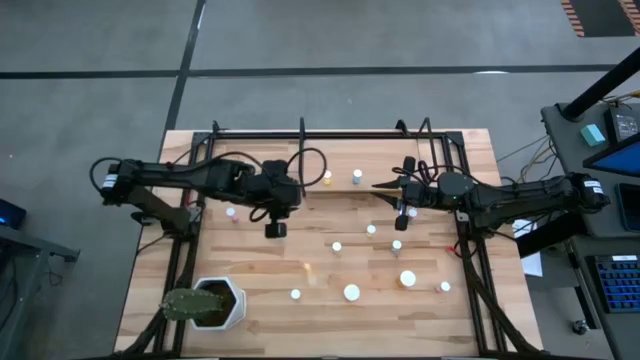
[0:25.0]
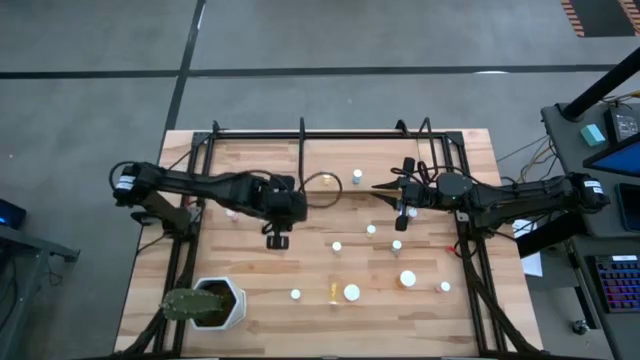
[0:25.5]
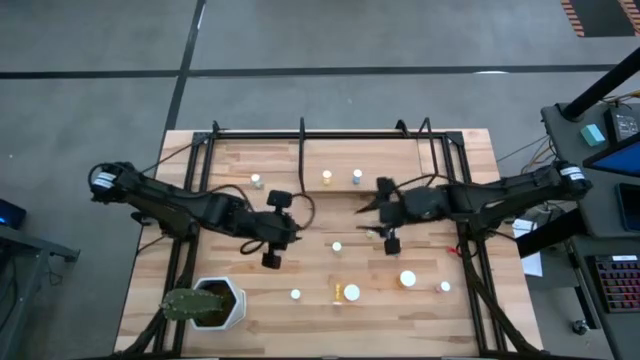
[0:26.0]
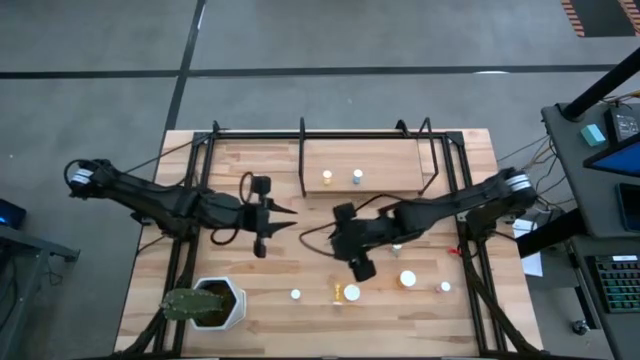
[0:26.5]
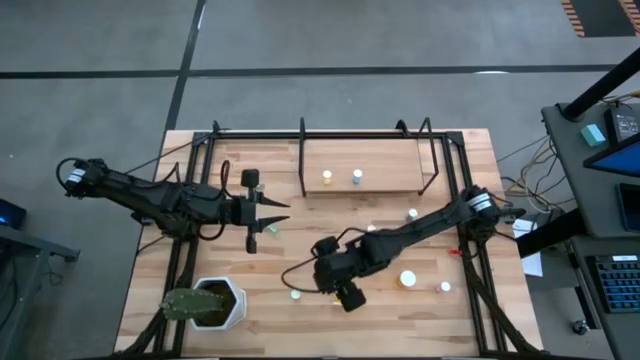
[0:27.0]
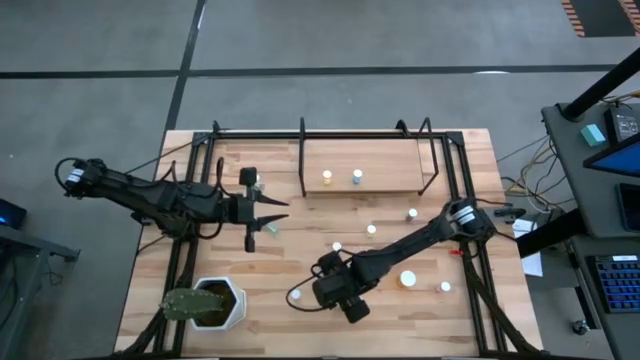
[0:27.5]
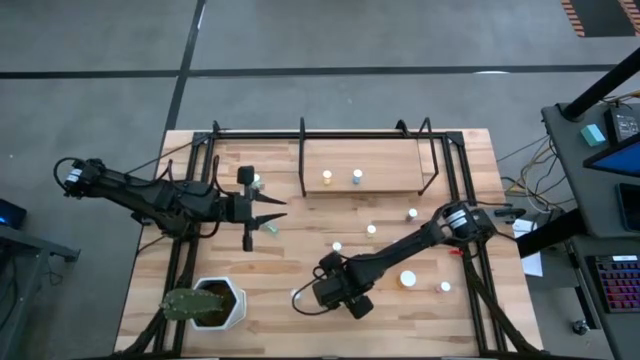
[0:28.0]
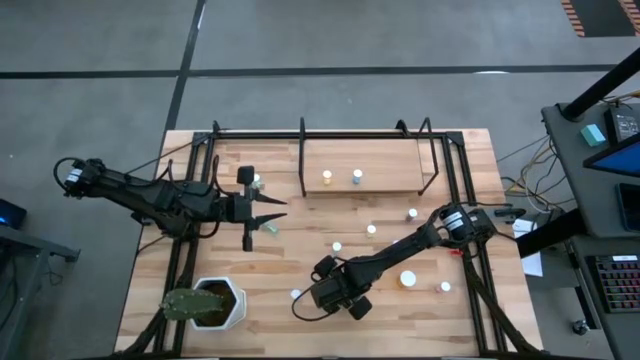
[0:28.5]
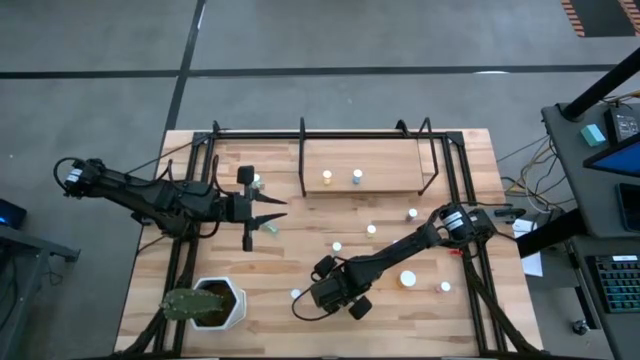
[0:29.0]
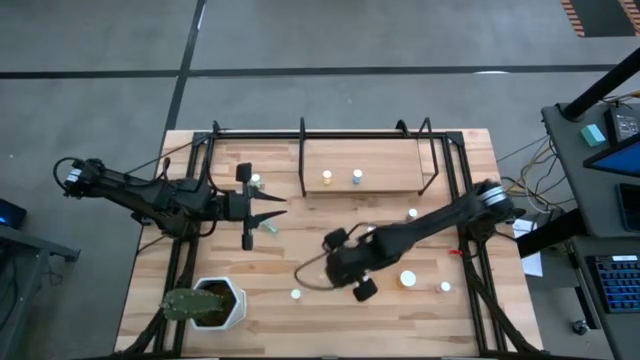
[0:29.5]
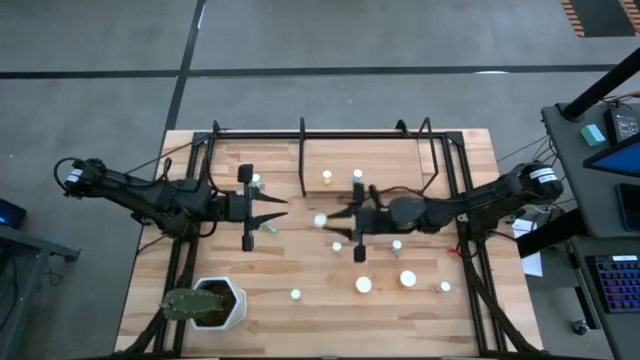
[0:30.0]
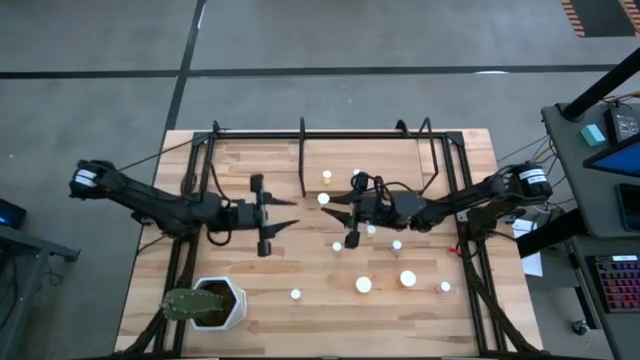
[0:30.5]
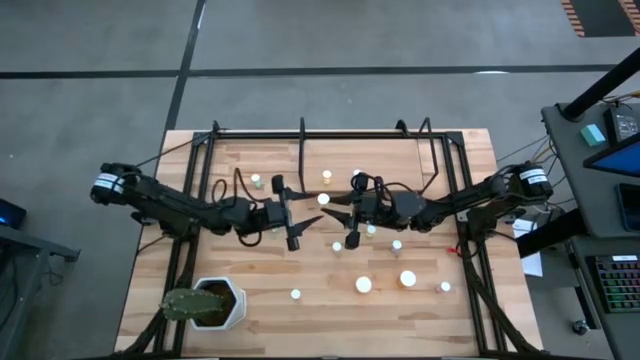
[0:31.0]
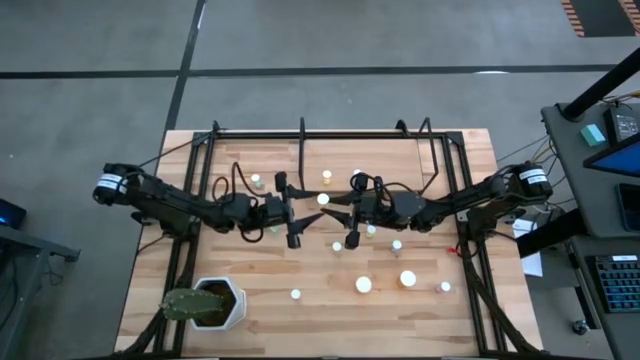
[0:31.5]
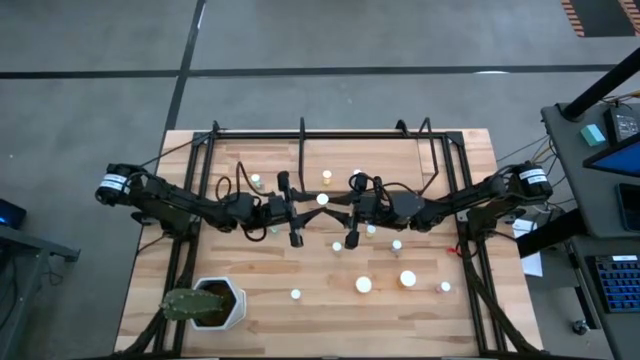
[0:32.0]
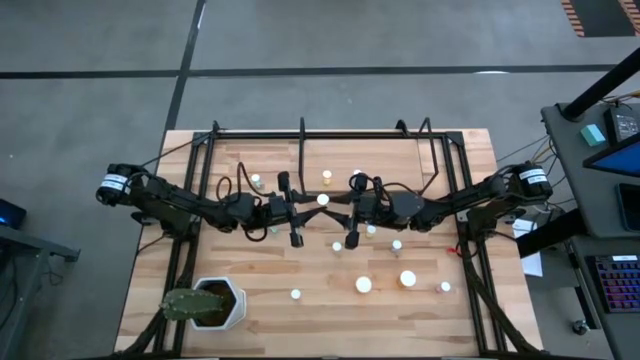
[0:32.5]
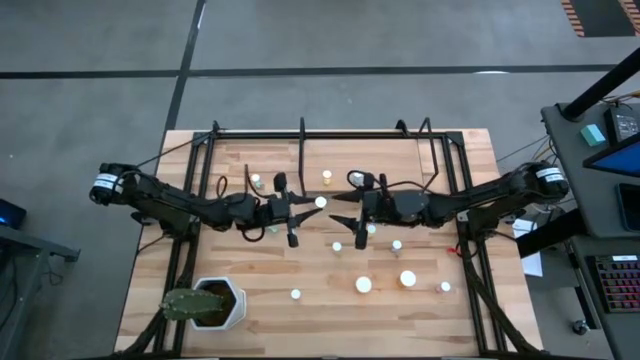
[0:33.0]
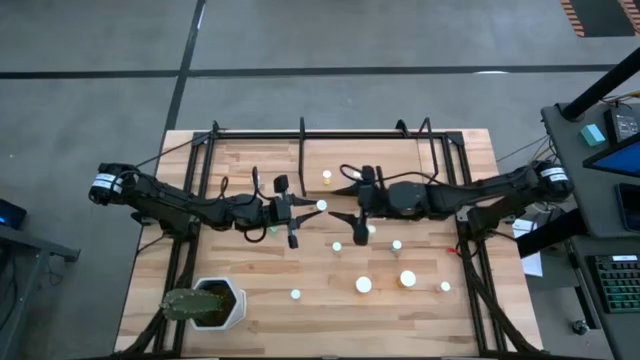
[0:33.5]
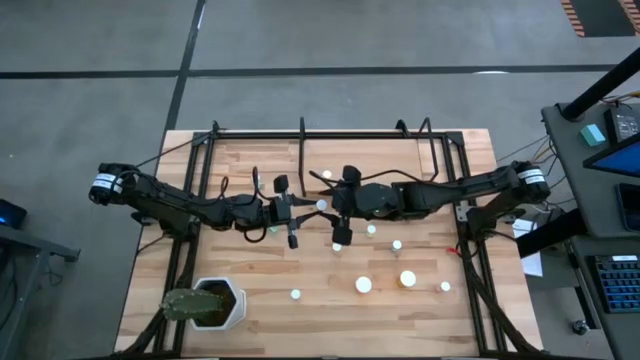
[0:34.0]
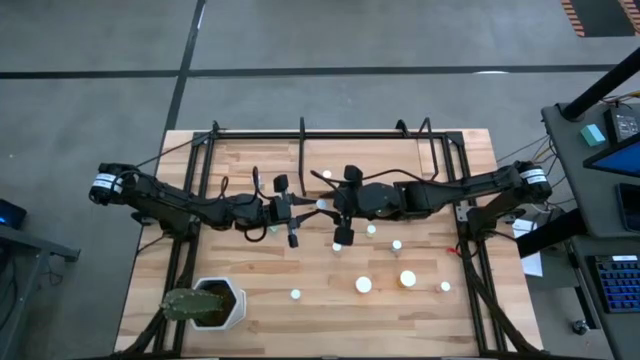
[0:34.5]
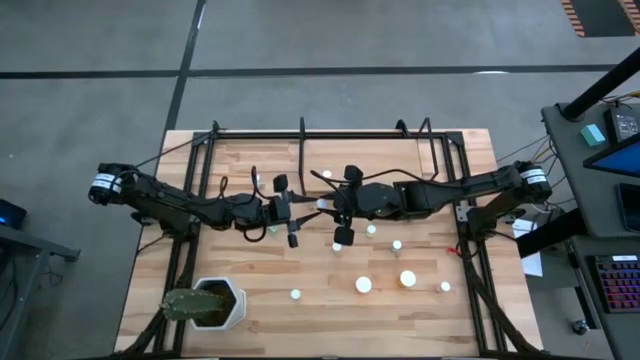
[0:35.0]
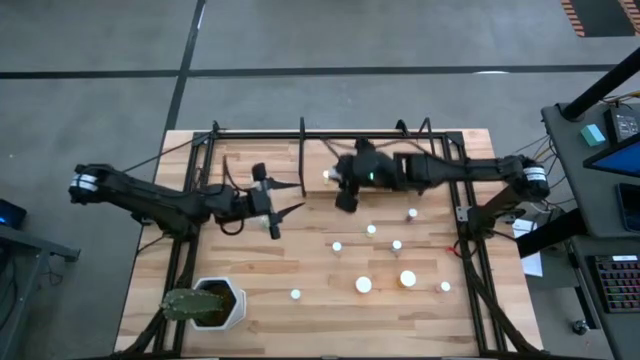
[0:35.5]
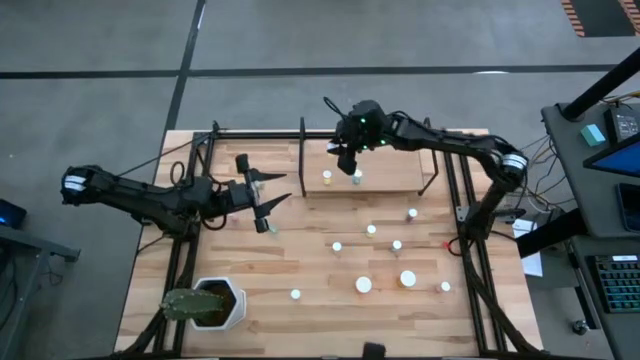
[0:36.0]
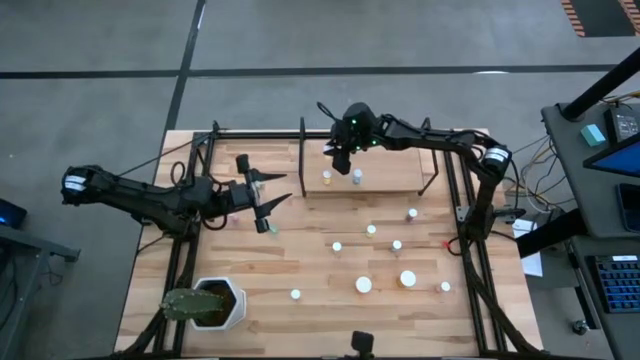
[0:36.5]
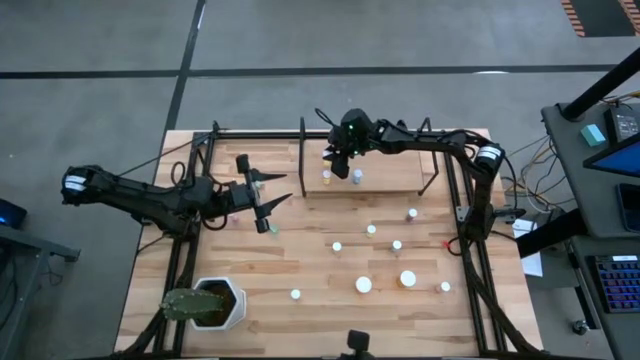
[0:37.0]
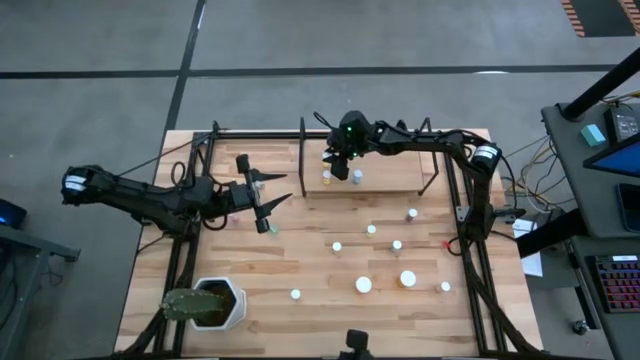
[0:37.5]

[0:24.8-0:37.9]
Task: Pick and place medicine bottles onto shelf by color
Put the yellow pill bottle on the shelf aligned with the other yellow pill bottle

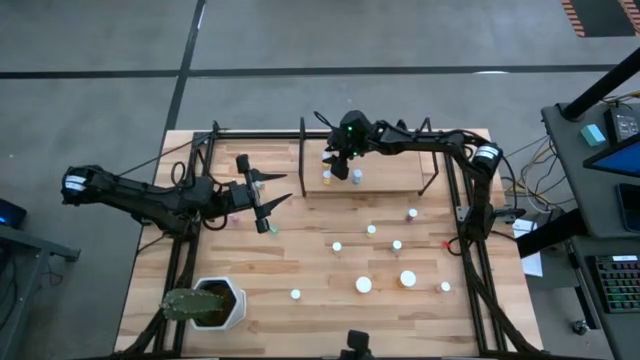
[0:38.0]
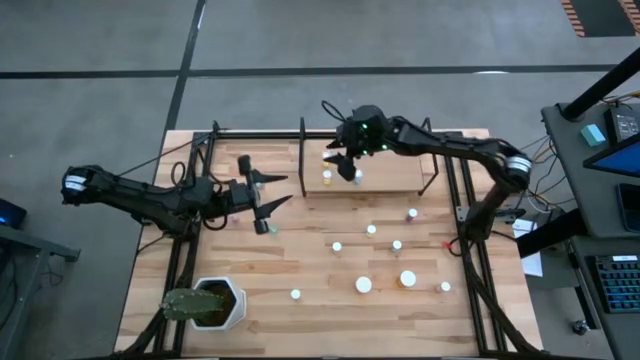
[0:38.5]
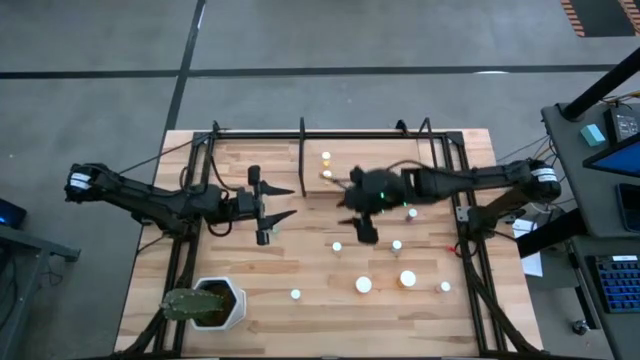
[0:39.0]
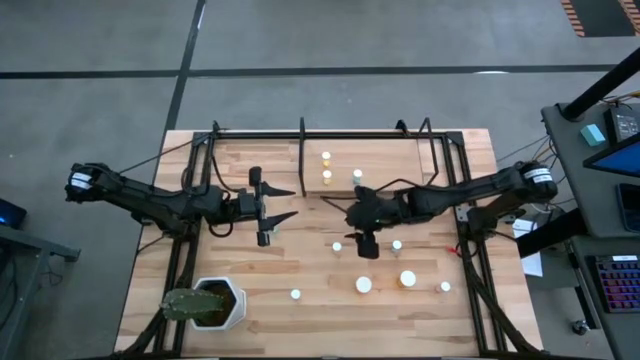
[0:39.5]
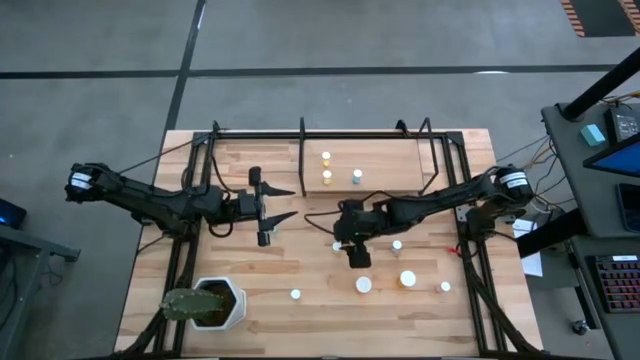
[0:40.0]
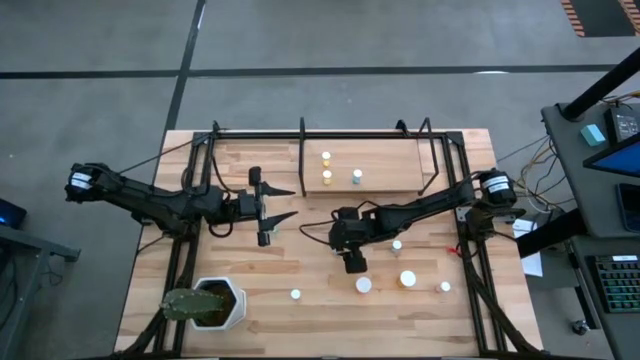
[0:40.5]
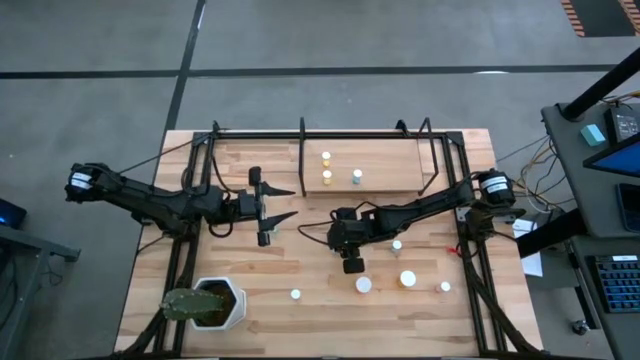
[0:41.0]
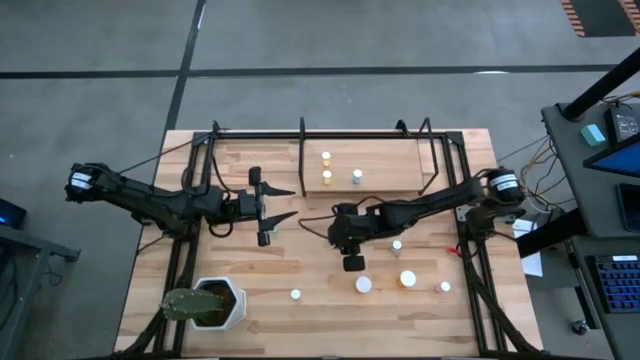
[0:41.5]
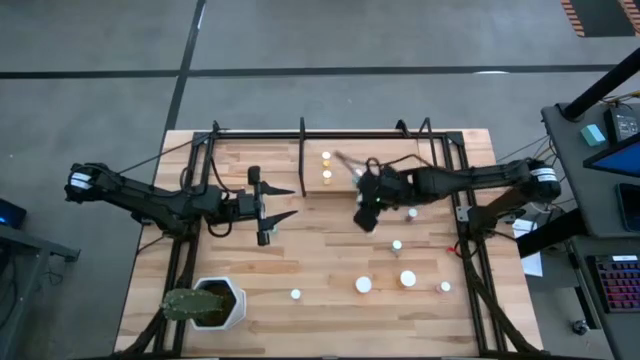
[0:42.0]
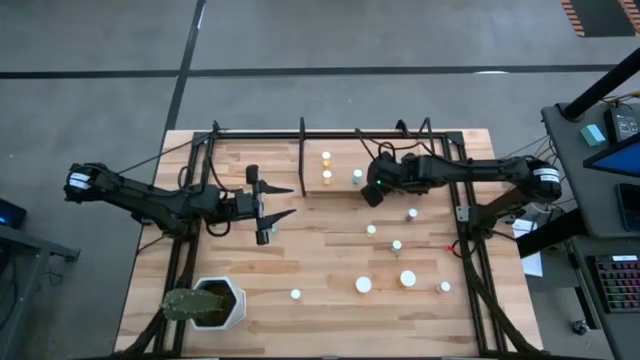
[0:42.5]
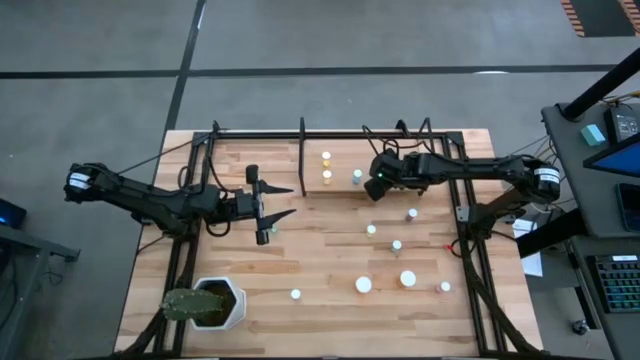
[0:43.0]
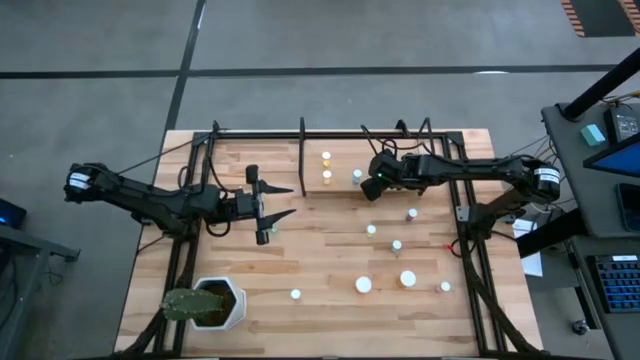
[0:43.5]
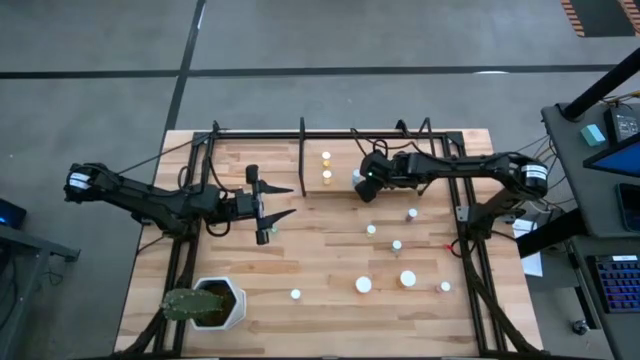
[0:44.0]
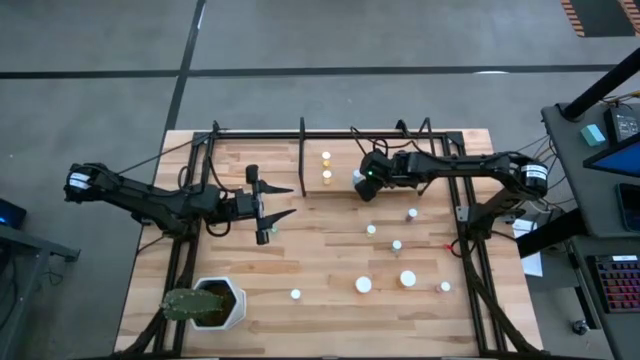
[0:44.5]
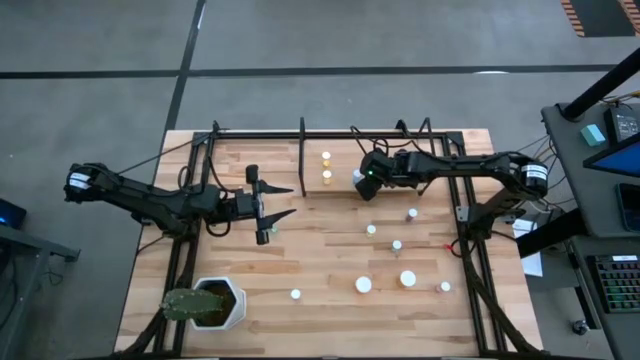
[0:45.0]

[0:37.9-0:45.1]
Put the yellow pill bottle on the shelf

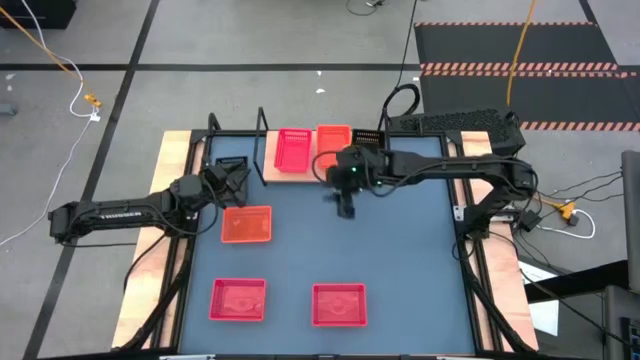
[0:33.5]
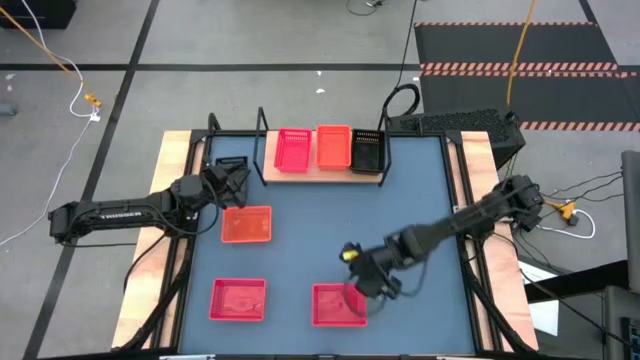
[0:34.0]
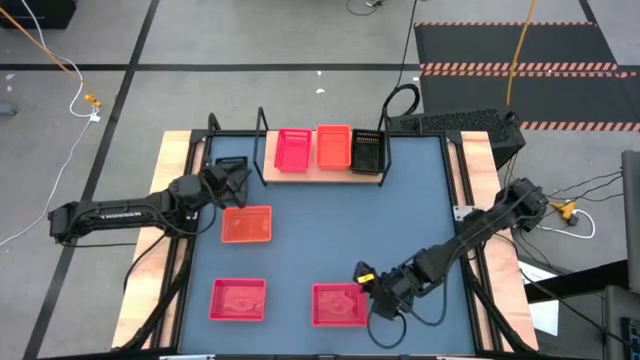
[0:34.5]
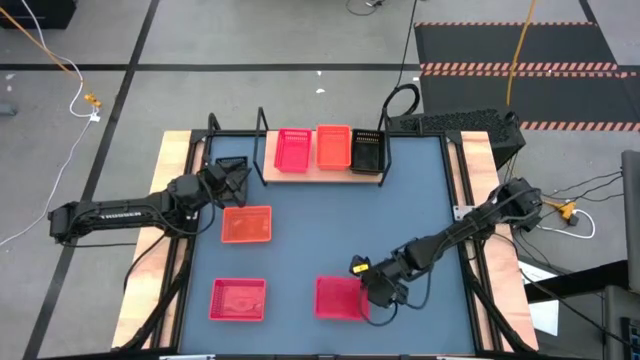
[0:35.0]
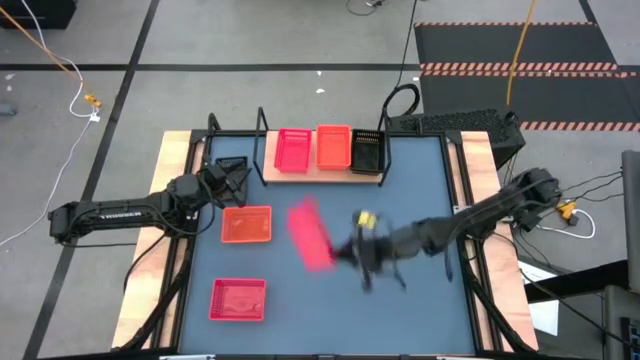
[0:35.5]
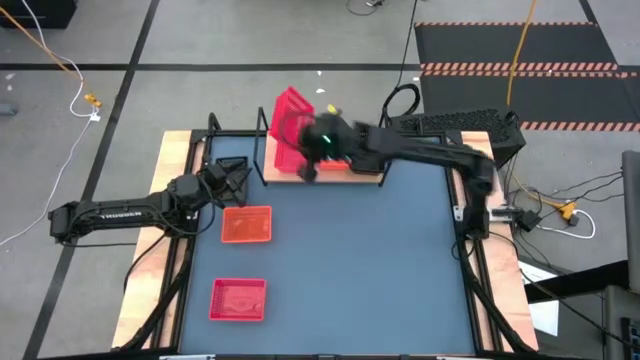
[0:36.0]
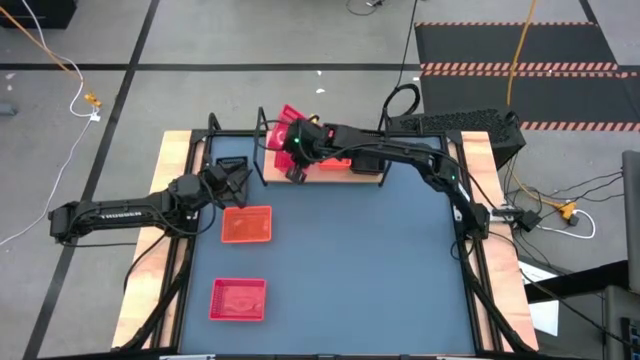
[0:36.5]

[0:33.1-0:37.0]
Task: Stack baskets on shelf by color
Stack the right red bin on the red bin on the shelf
